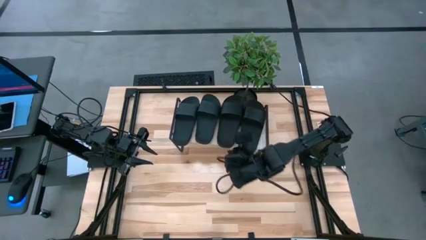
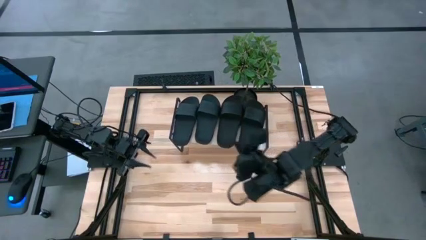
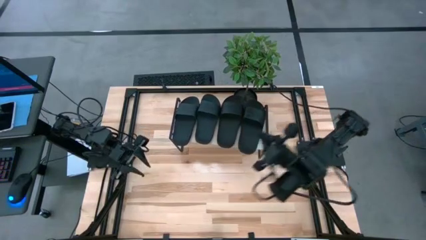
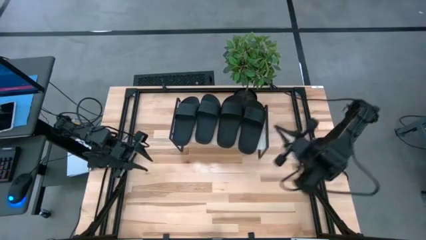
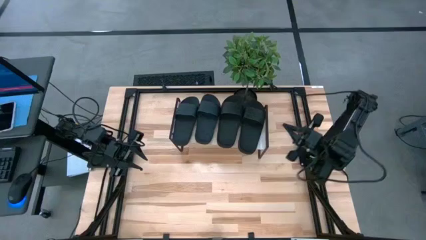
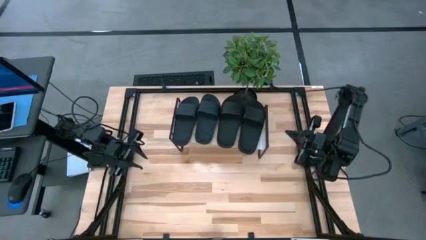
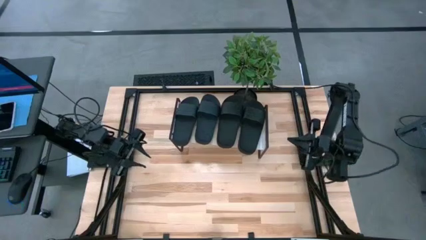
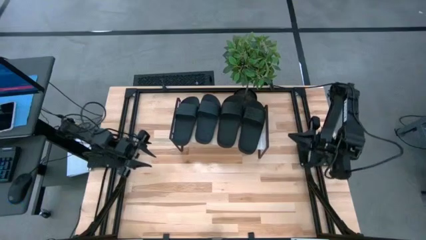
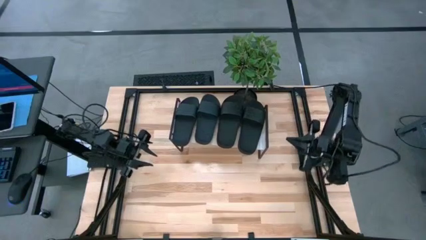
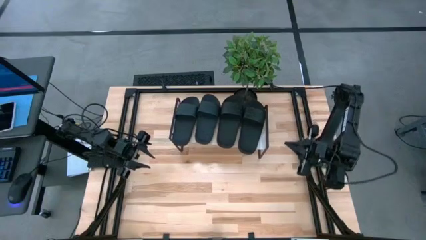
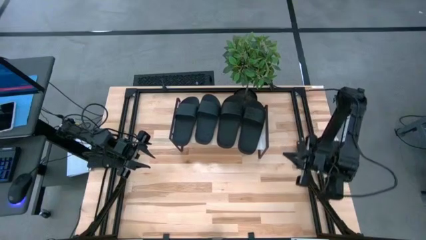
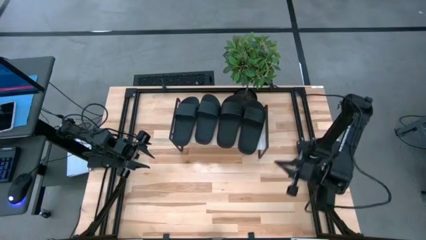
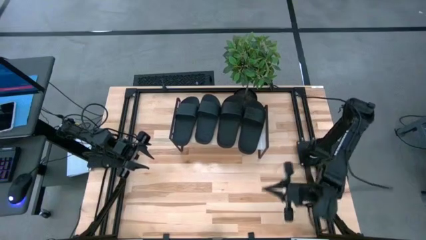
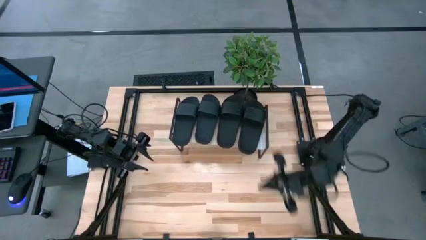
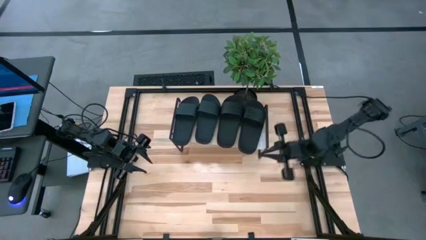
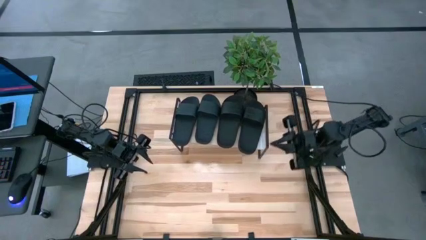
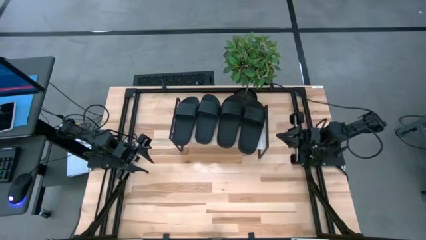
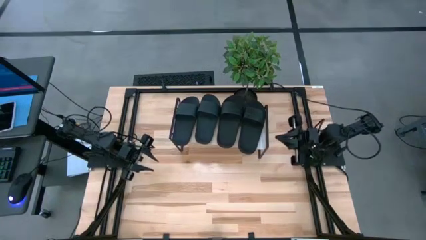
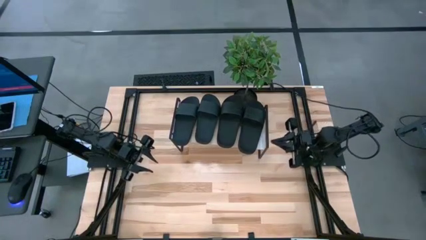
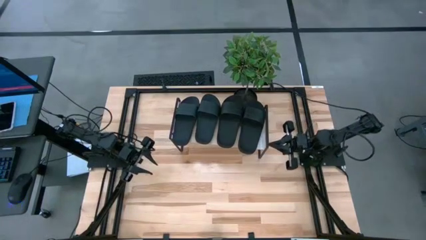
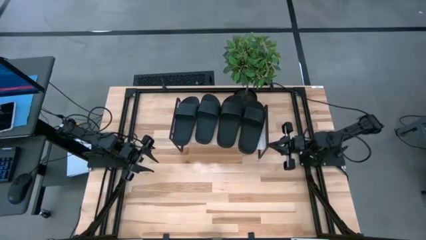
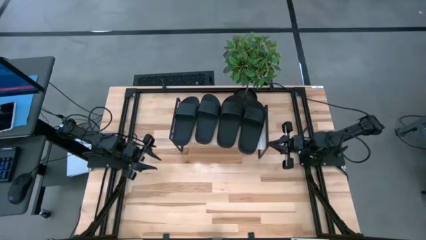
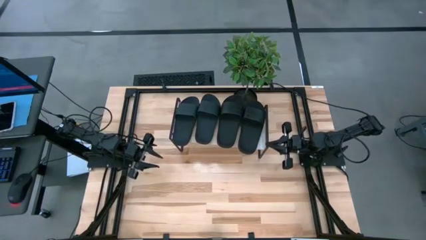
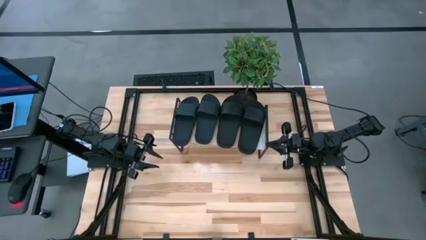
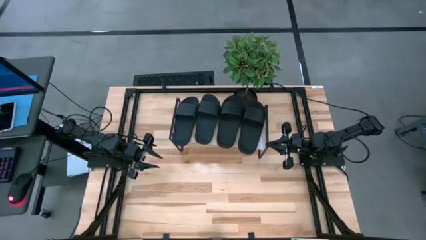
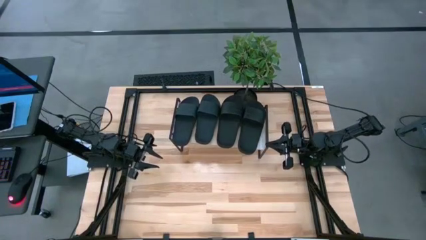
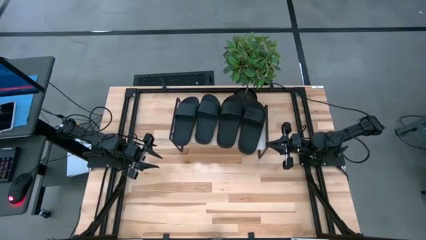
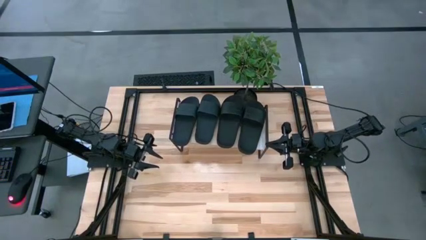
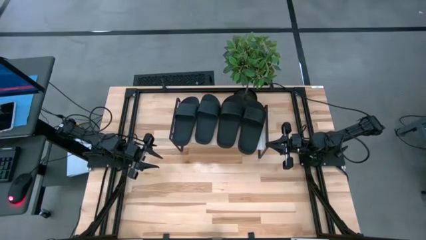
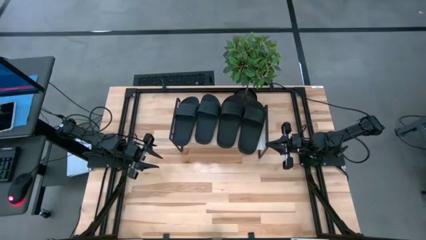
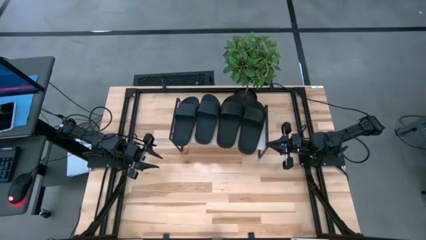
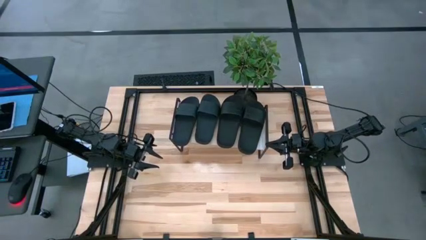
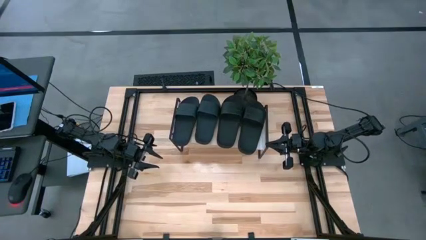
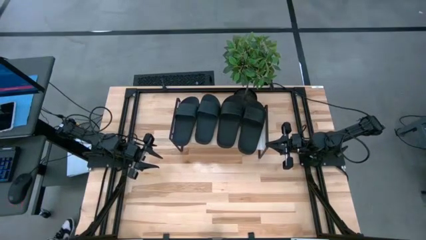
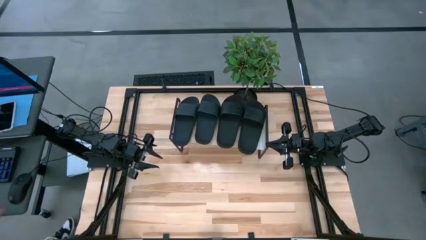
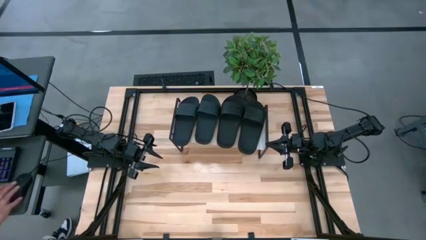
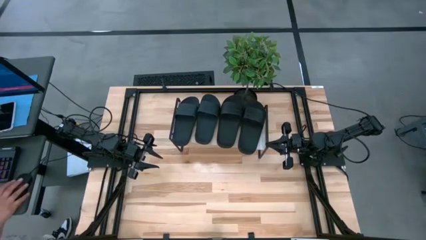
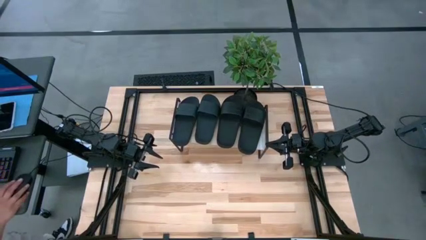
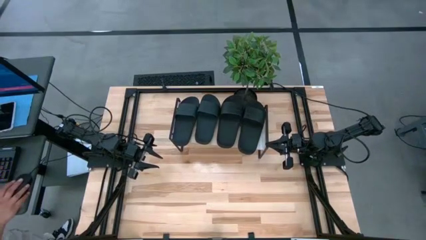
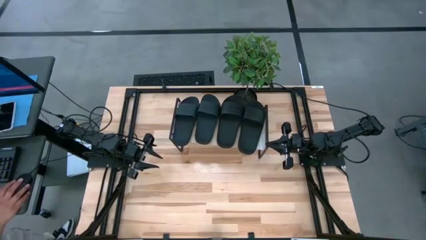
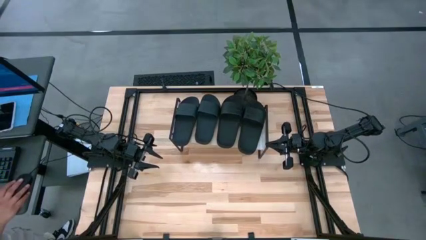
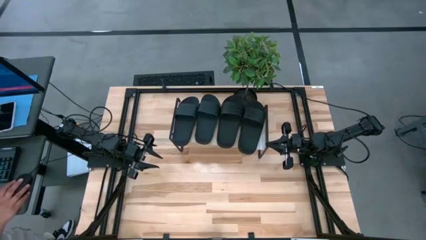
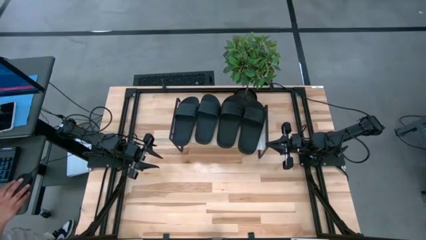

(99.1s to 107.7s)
Task: Pick and place slides into the shelf
Return to Home Position

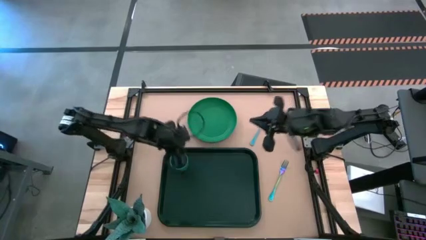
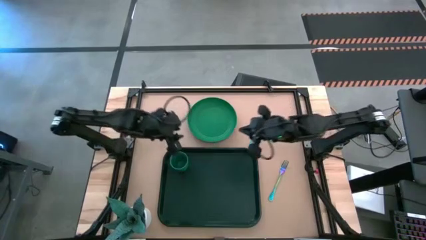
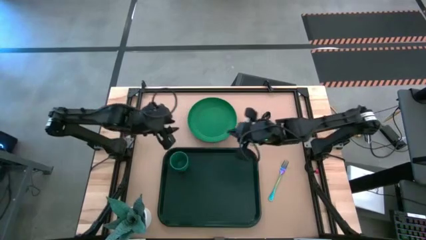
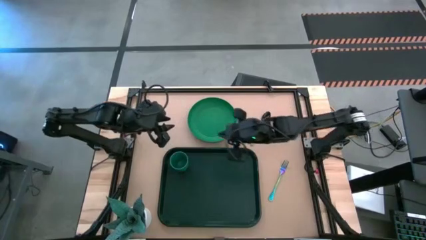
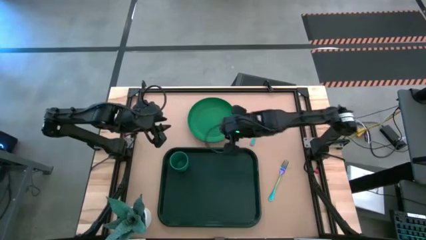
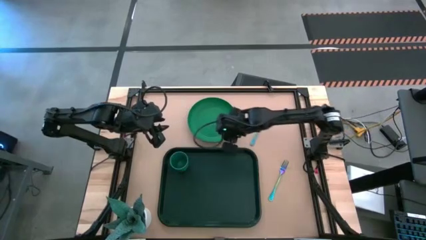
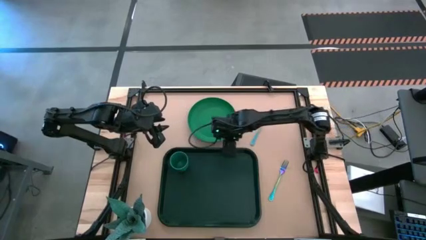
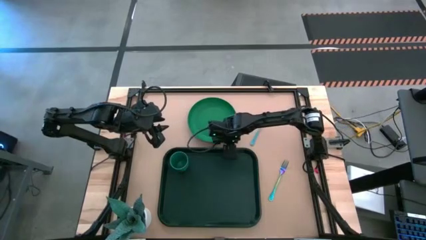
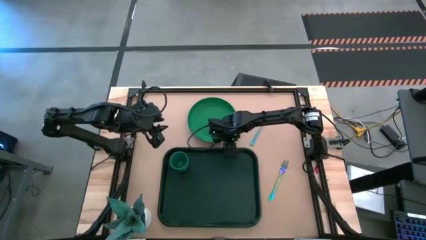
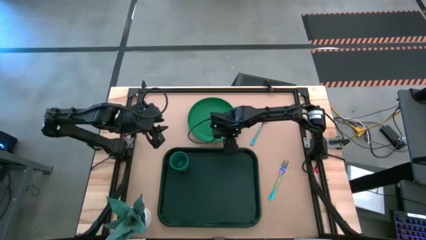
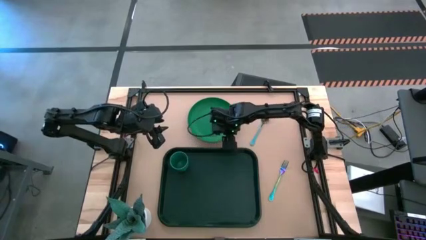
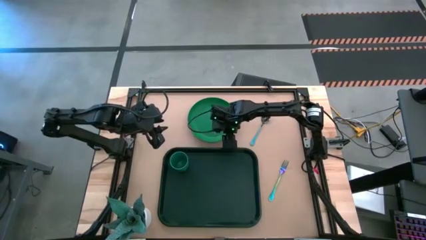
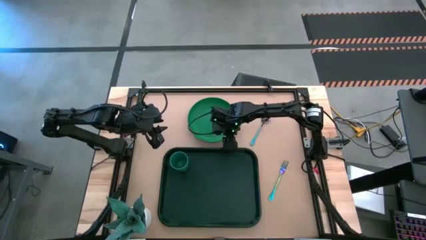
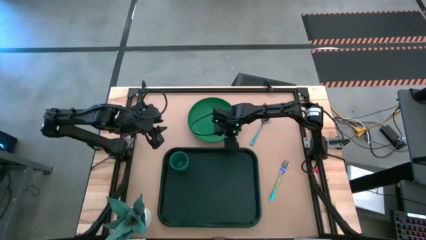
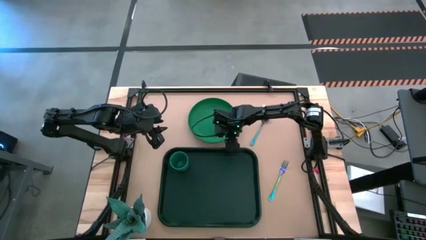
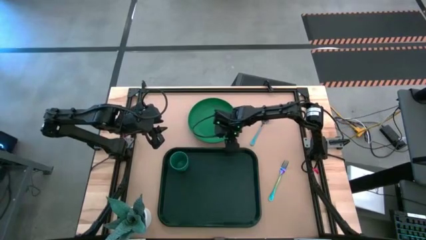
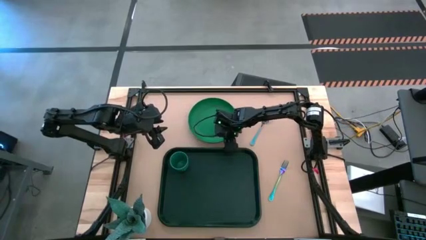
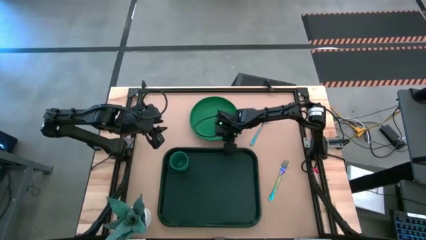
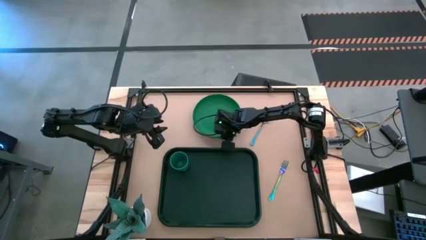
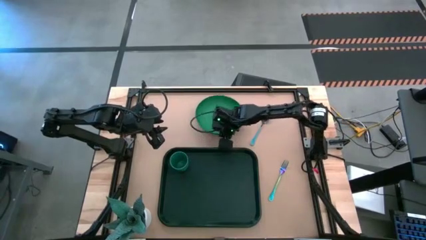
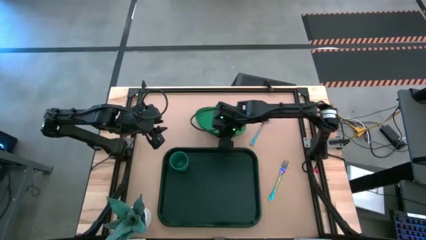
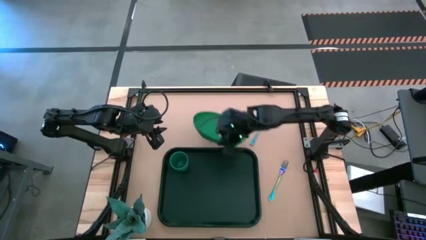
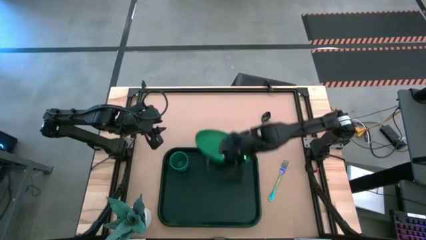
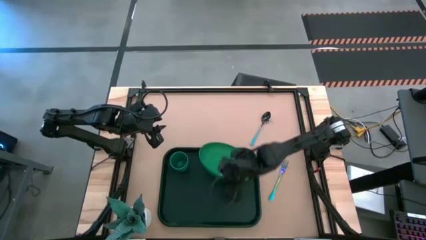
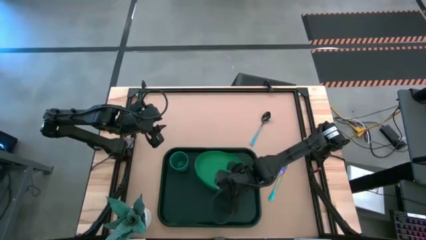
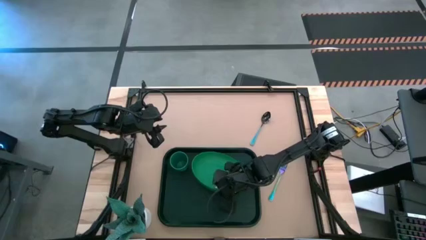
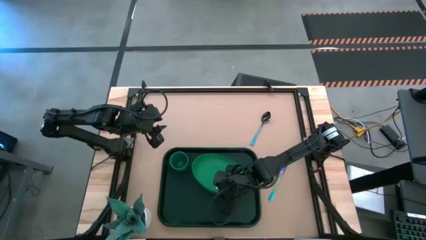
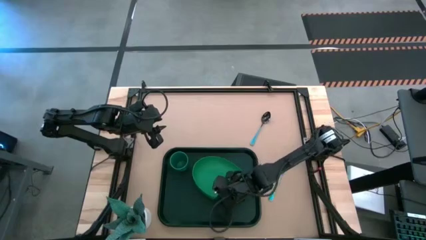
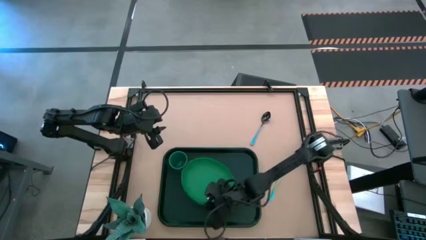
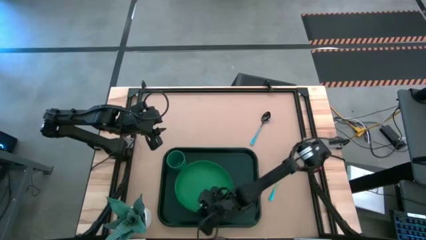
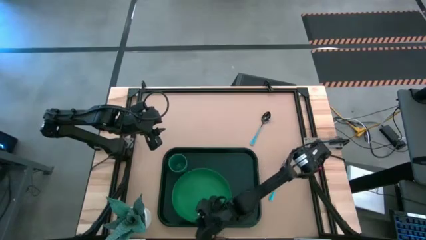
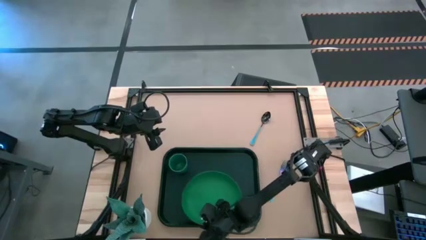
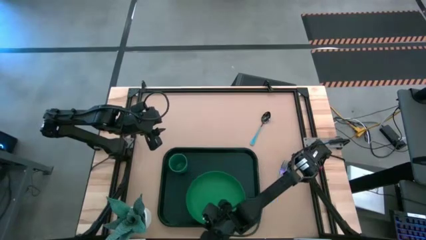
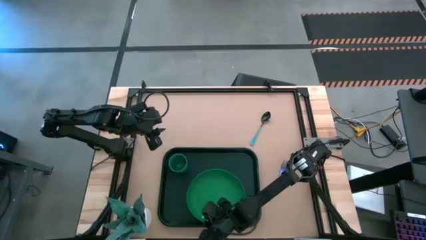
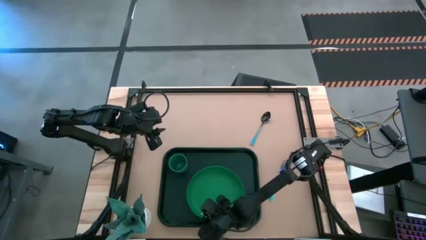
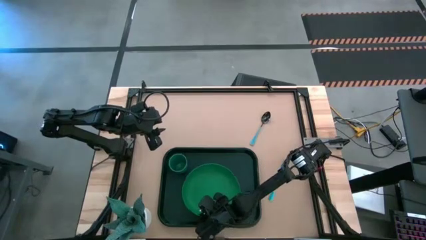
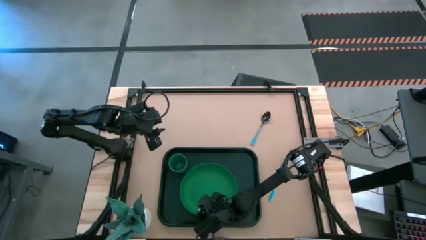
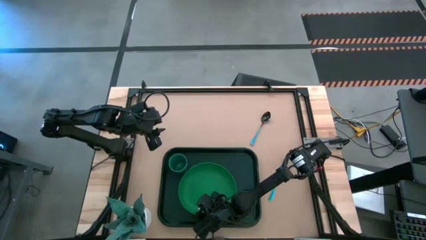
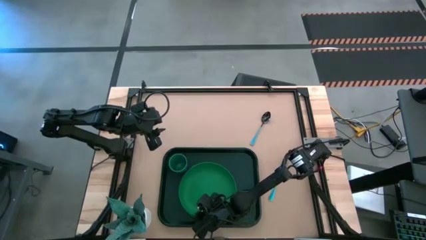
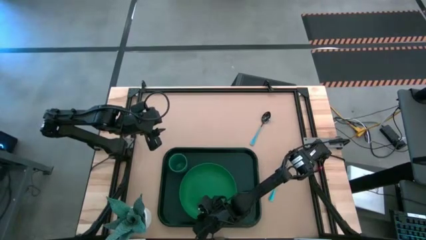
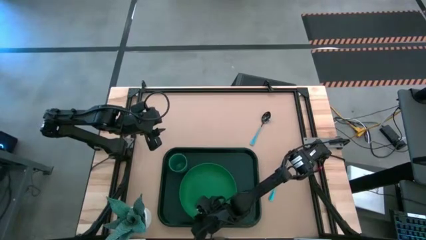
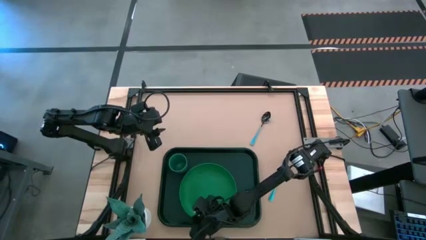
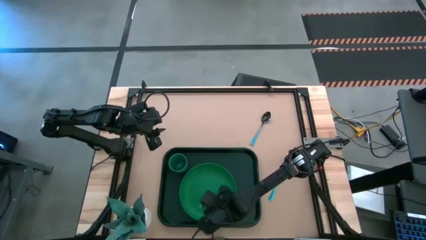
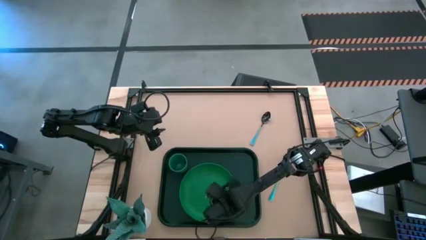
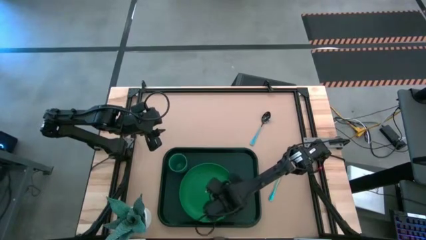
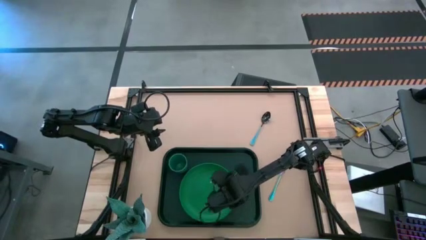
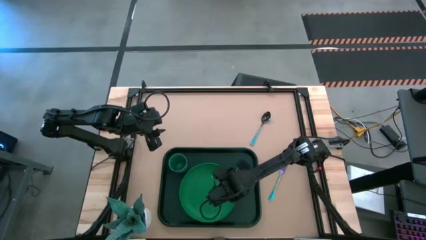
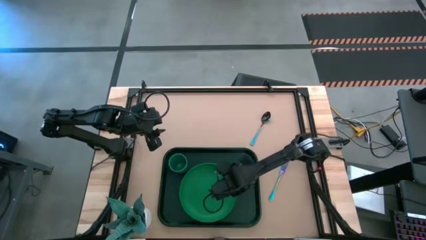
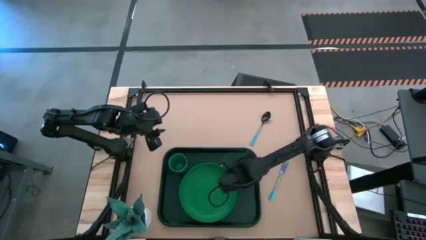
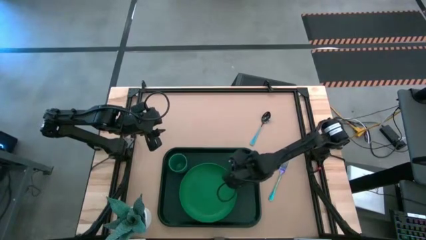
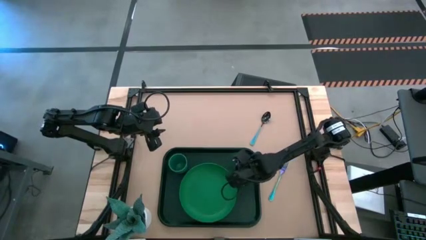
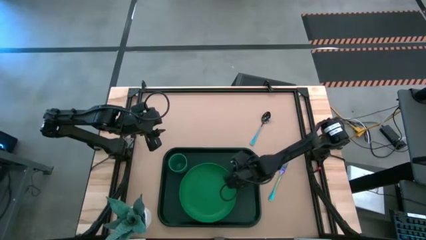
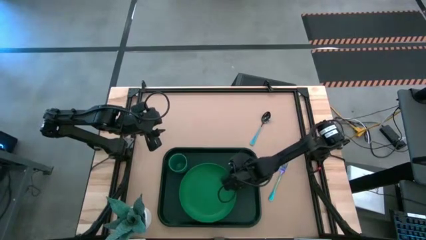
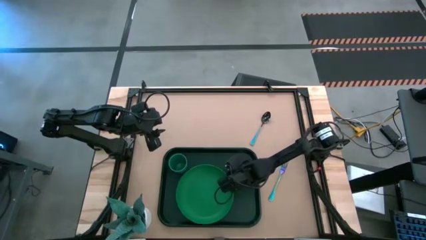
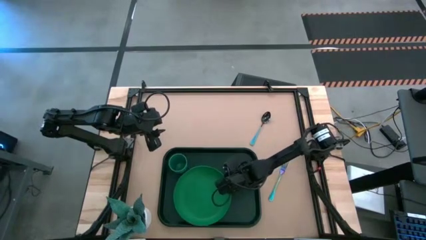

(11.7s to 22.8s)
Task: Pick and place plate/cup/fork/spoon on tray
Put the green plate on the dark green tray
